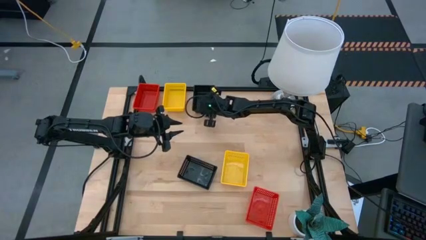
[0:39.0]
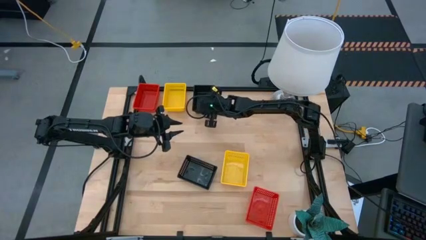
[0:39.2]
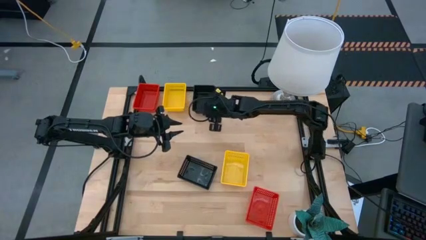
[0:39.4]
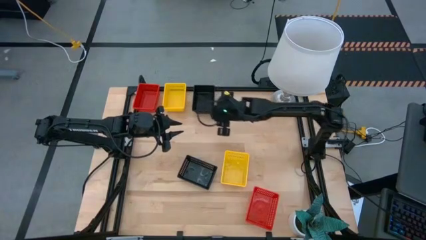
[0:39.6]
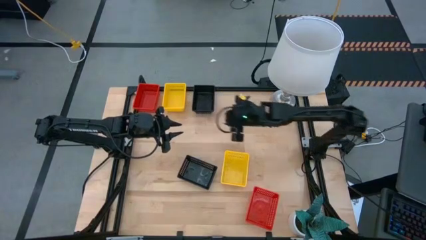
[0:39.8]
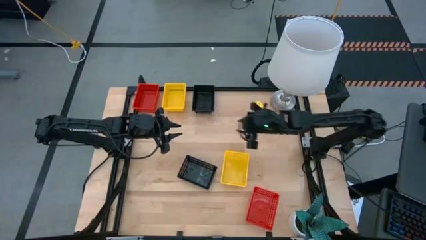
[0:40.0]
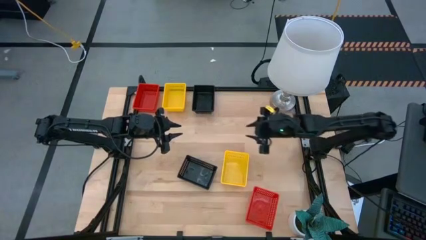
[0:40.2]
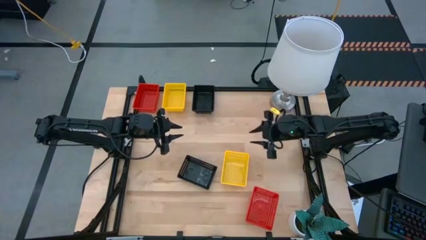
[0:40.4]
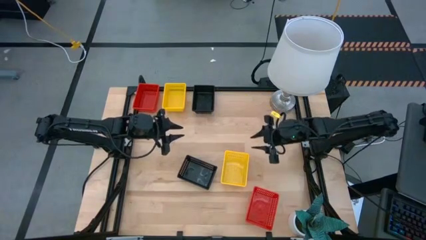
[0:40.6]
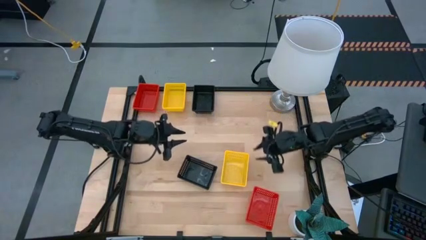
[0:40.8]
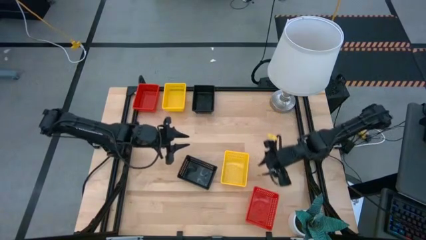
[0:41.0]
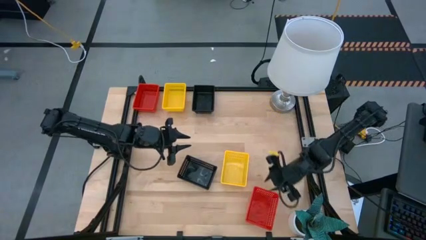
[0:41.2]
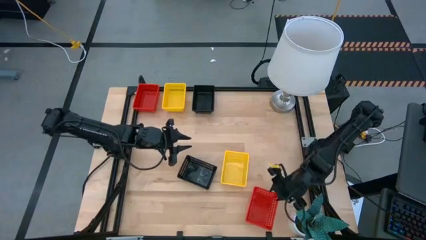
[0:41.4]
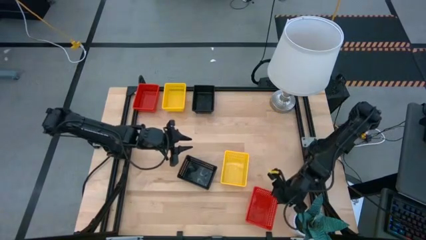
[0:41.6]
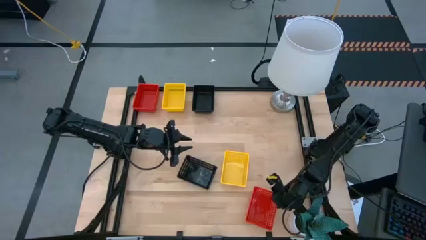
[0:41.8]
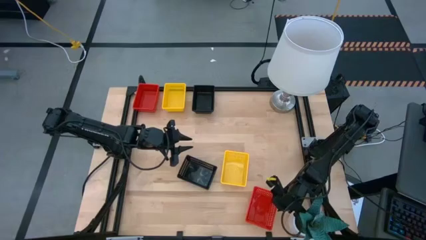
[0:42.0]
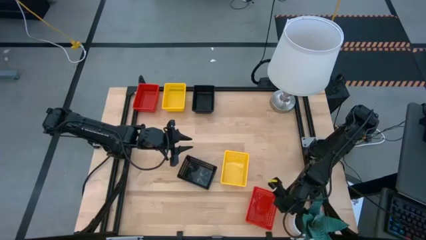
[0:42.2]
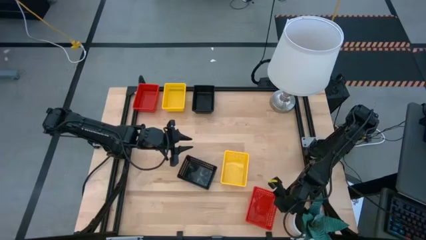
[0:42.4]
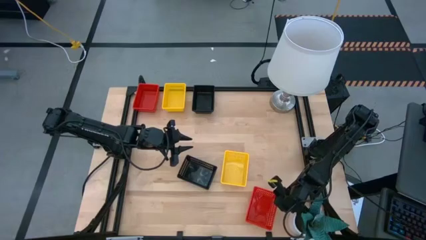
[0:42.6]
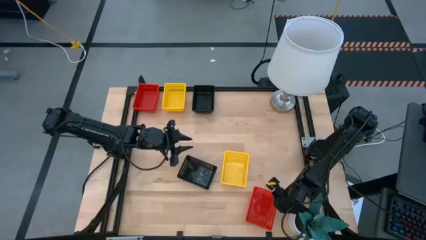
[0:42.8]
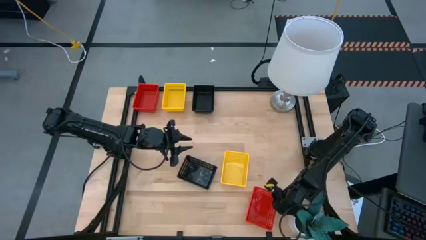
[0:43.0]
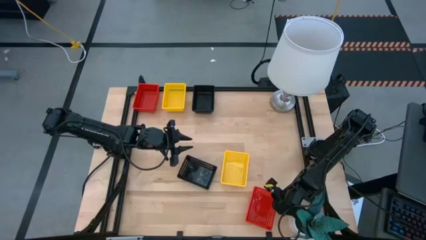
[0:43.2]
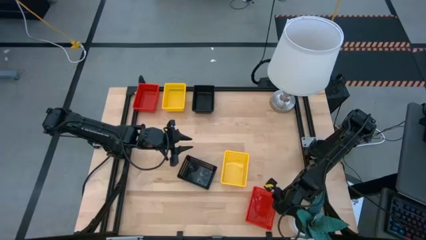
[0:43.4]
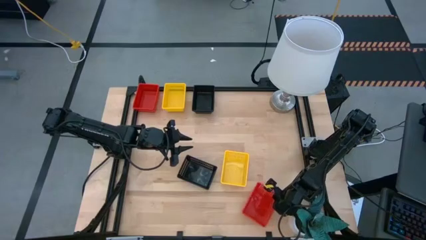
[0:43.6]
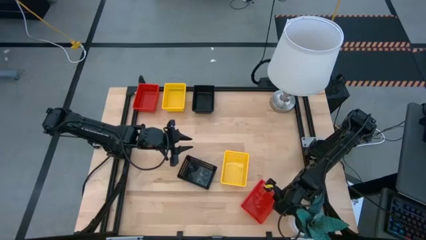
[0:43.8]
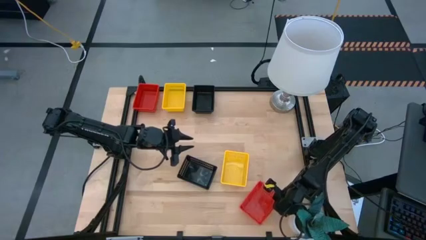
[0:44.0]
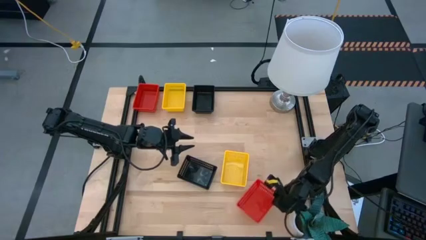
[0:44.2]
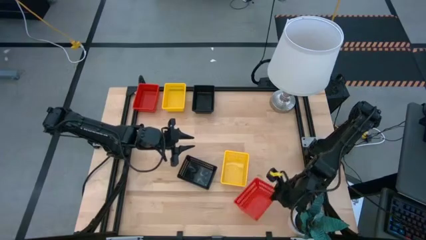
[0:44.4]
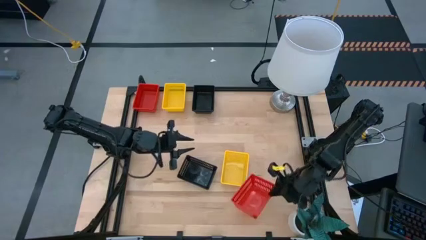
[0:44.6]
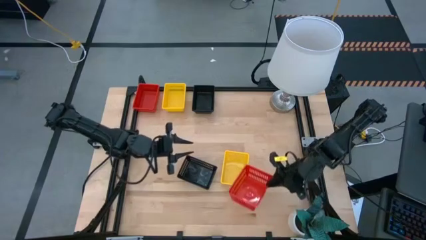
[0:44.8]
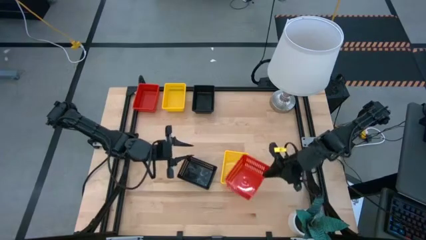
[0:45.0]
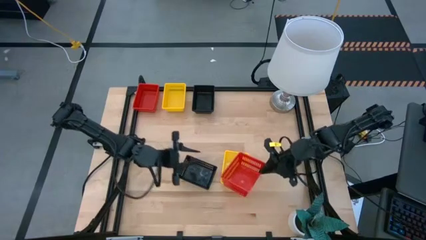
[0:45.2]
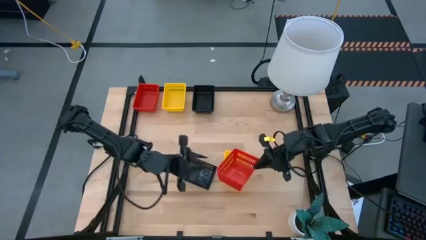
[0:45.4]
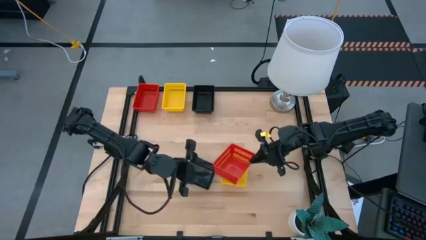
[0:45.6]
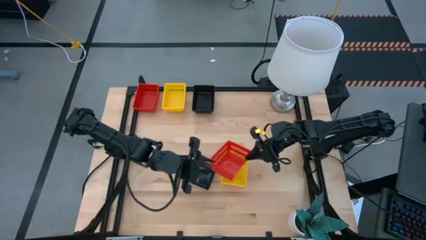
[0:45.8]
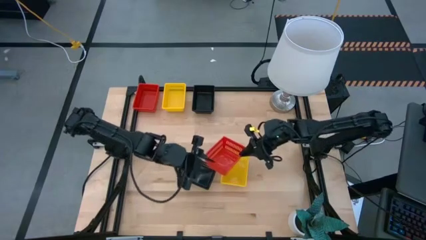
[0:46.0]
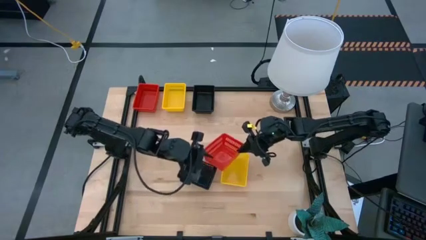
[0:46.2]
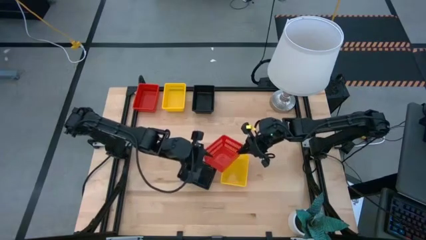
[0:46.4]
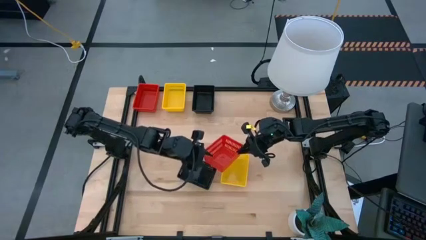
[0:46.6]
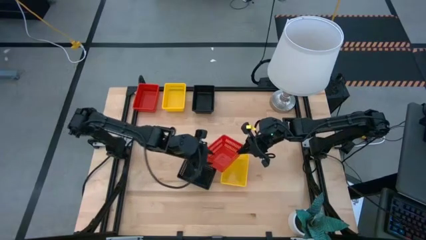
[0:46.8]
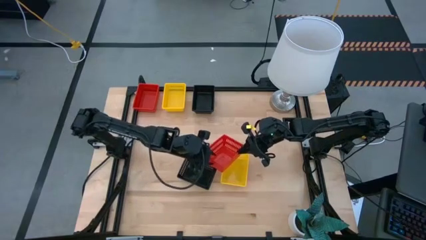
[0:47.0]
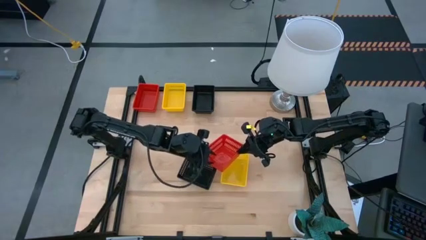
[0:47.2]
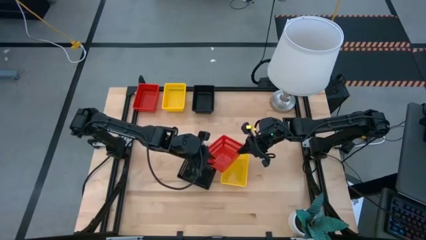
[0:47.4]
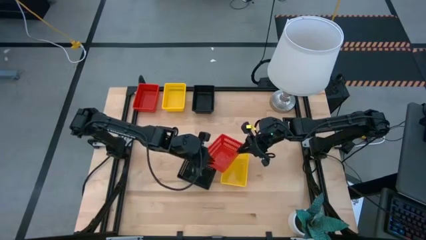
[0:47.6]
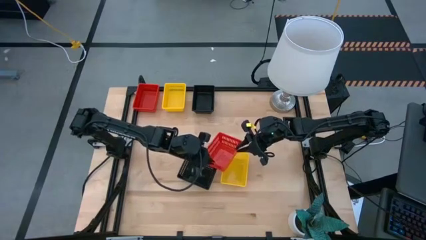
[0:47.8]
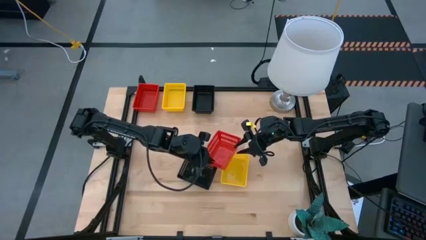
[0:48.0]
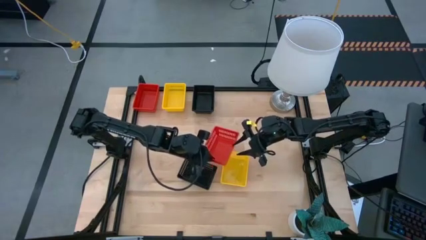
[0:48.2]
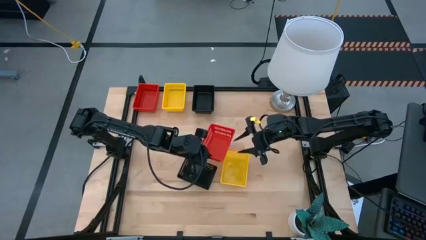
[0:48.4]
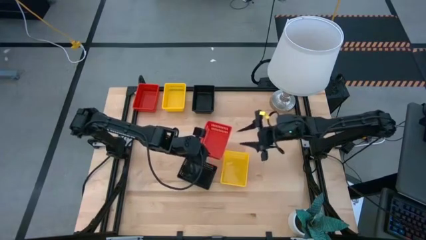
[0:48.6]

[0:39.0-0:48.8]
Stack the bottom red bin on top of the top red bin

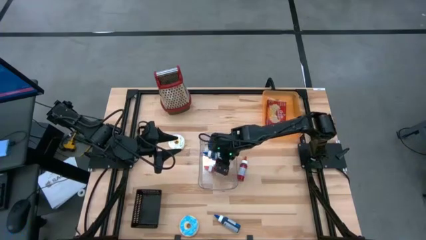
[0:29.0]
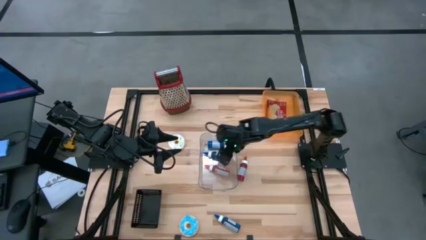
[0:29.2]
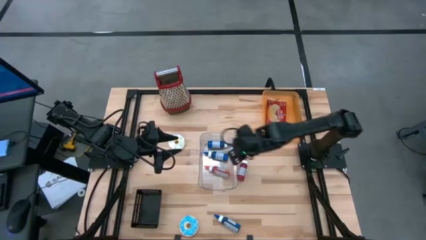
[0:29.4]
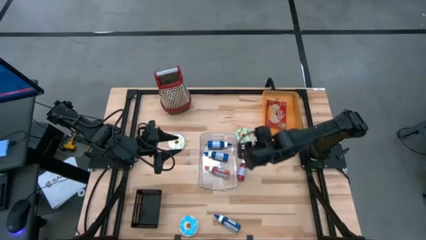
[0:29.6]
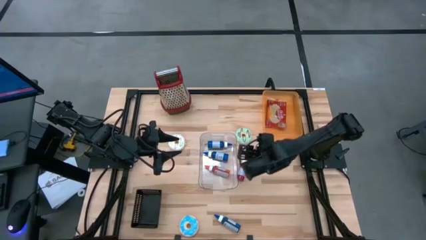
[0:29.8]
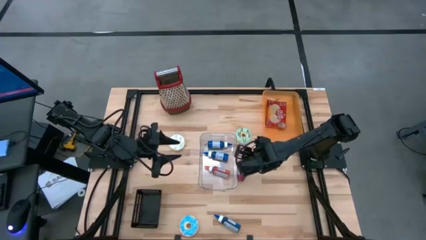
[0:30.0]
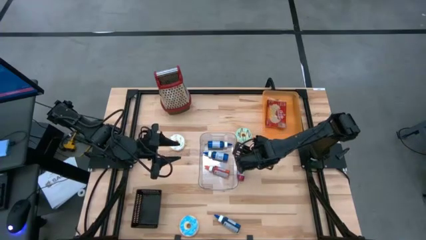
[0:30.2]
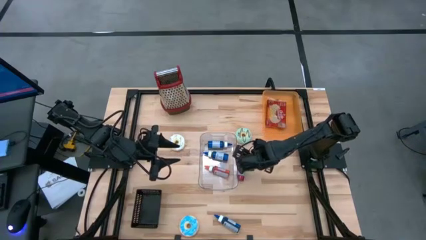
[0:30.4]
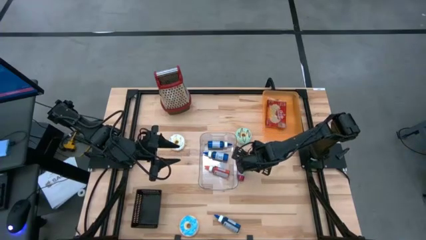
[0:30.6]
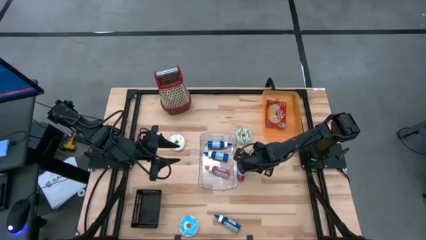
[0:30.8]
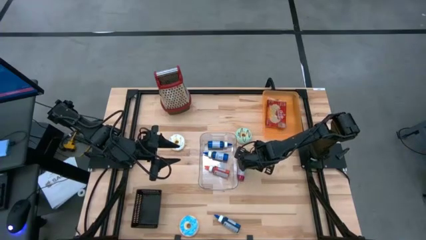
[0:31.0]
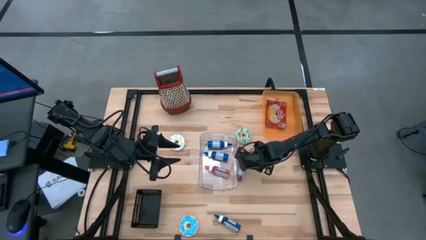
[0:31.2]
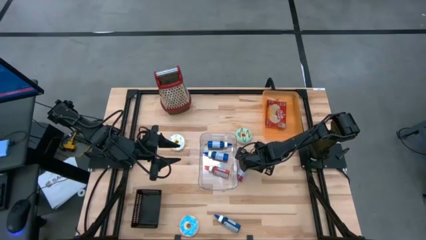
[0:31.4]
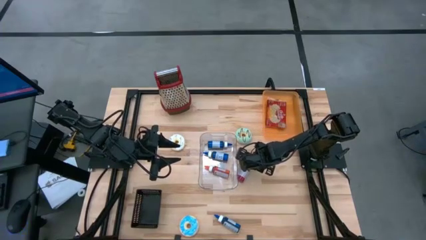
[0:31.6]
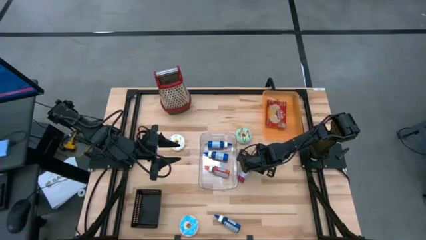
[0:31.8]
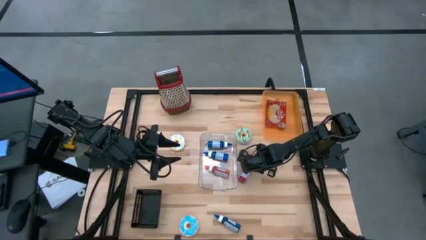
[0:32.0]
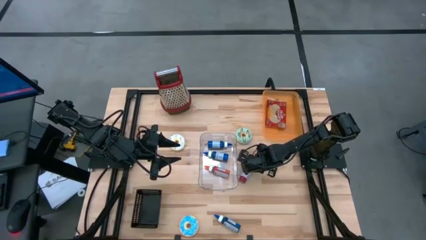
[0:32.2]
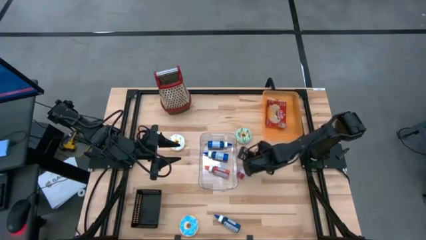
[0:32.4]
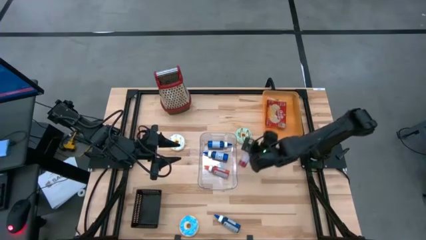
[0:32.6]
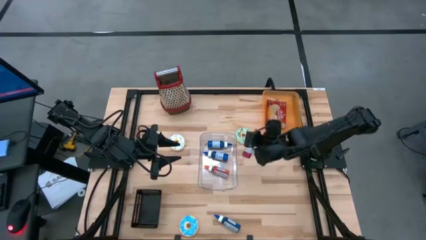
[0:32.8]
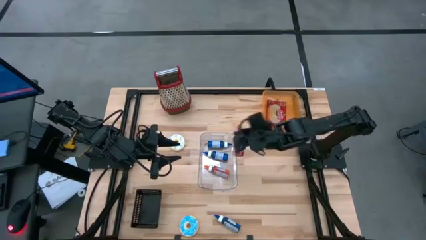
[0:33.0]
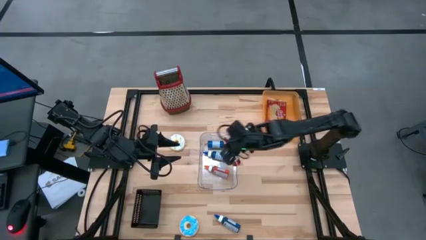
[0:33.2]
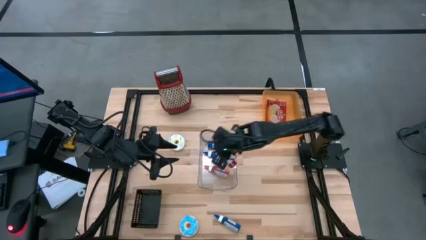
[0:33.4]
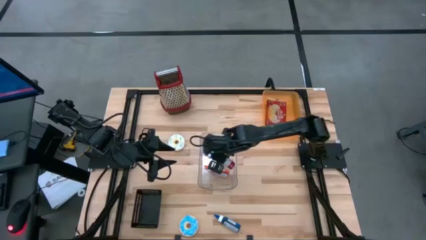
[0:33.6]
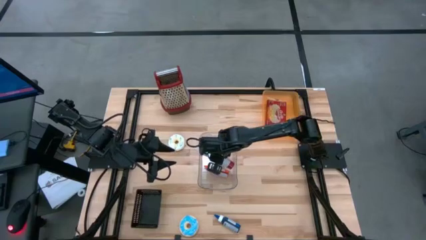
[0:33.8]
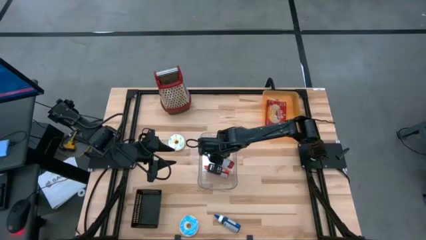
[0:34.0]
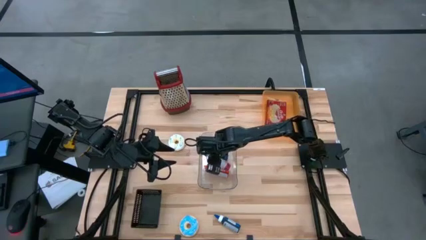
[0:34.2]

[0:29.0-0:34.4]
Put the red food coloring bottle into the transparent bin
